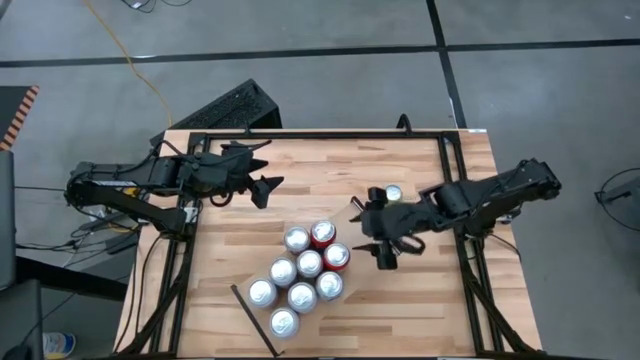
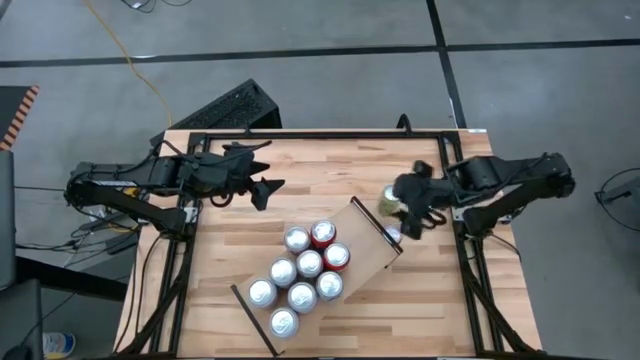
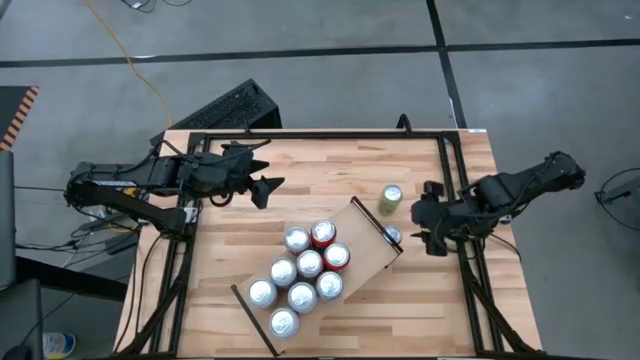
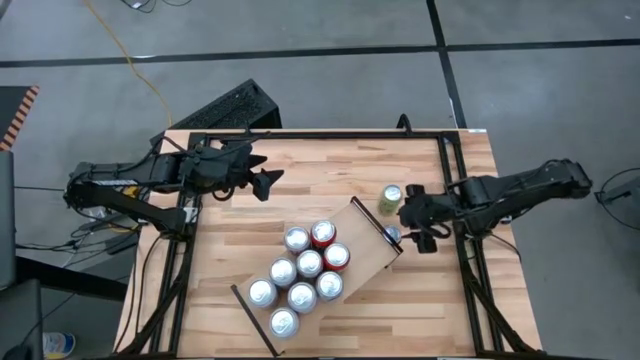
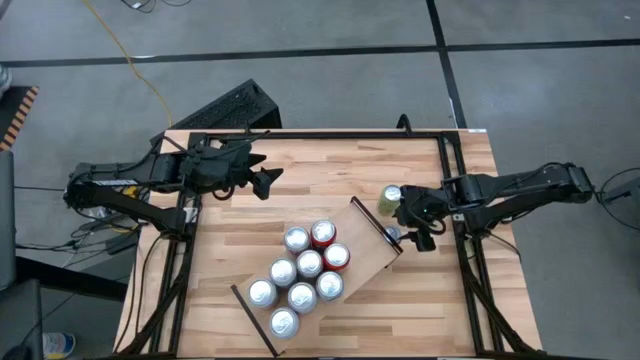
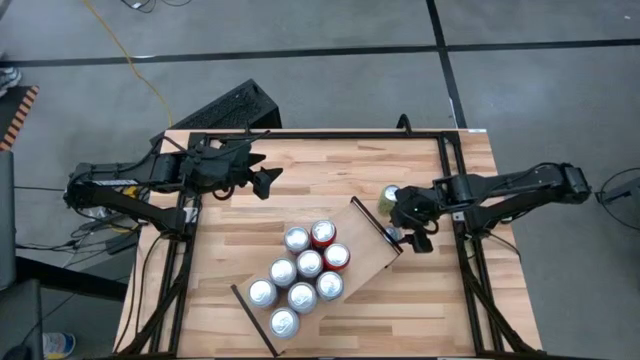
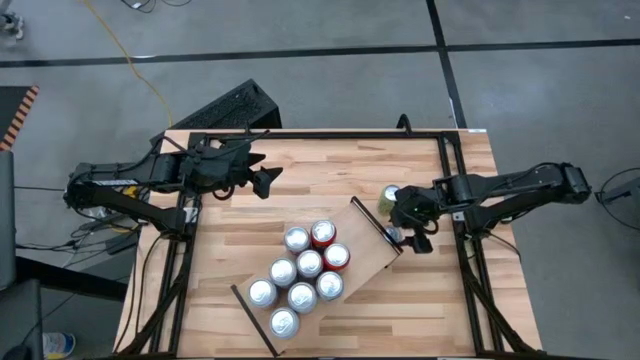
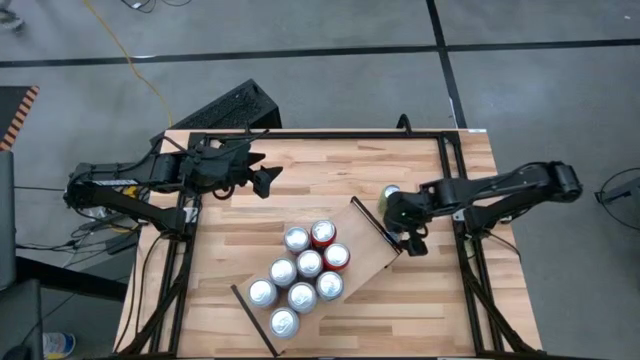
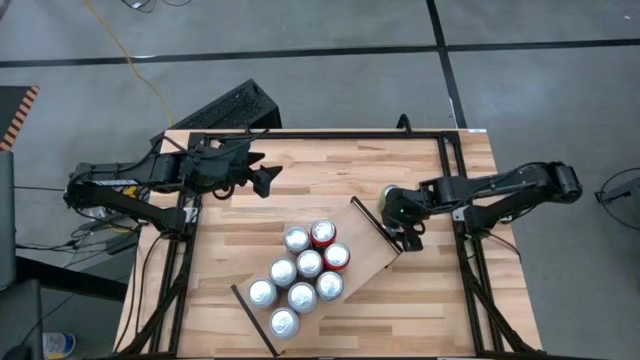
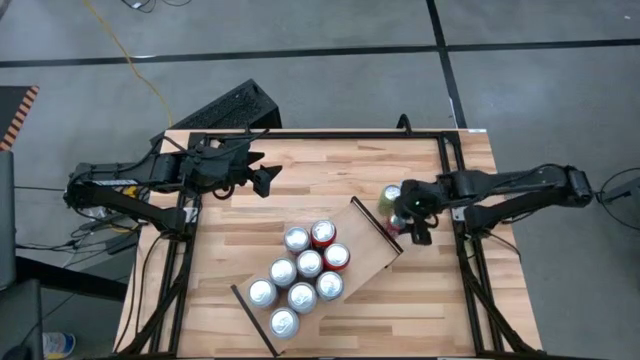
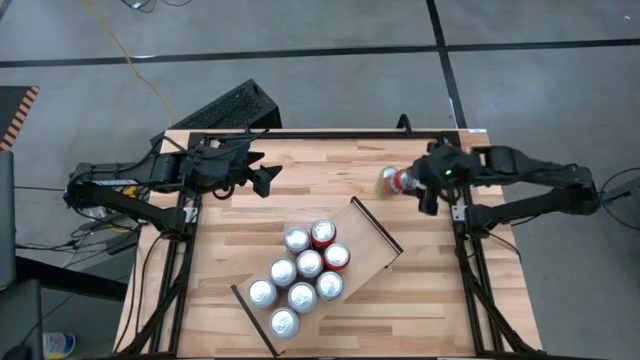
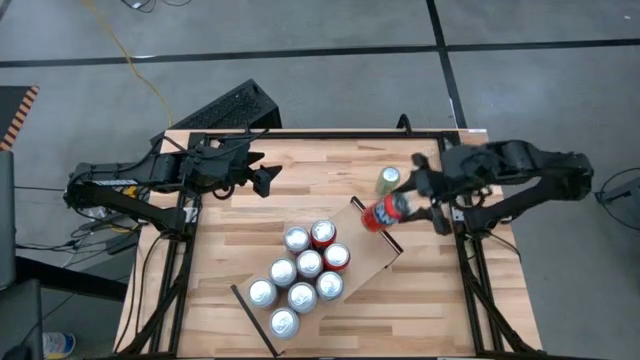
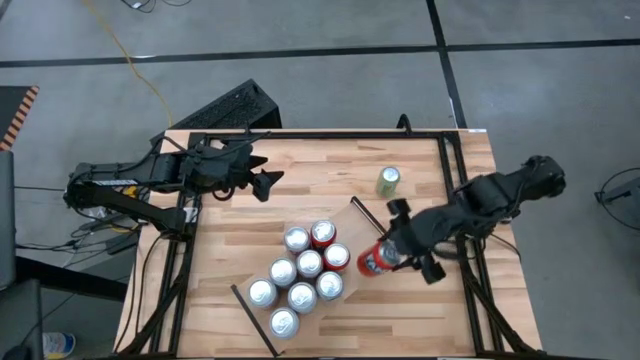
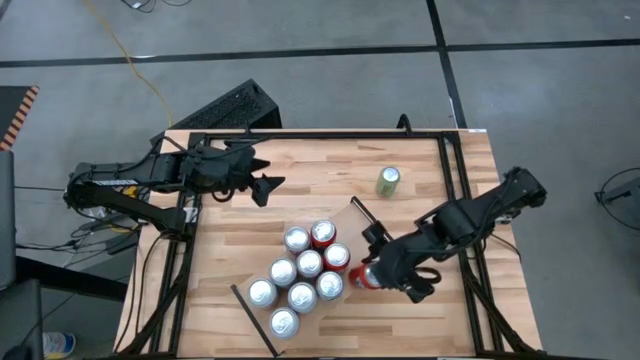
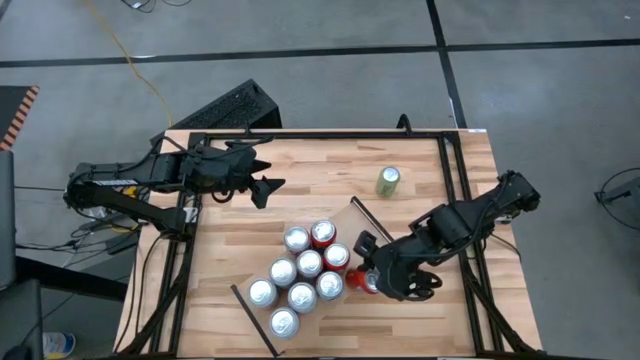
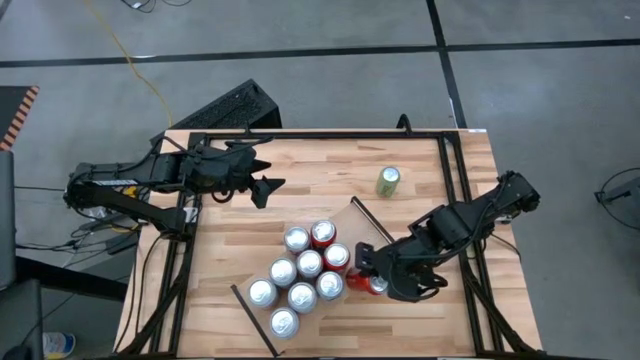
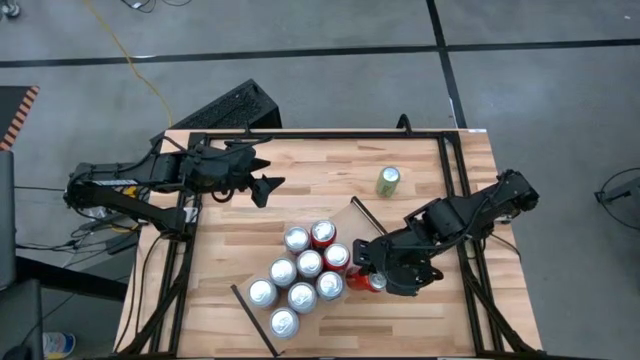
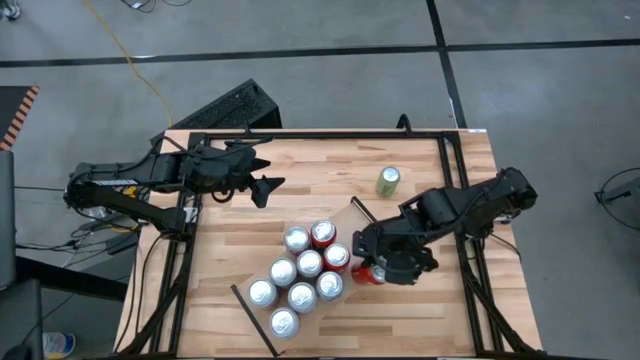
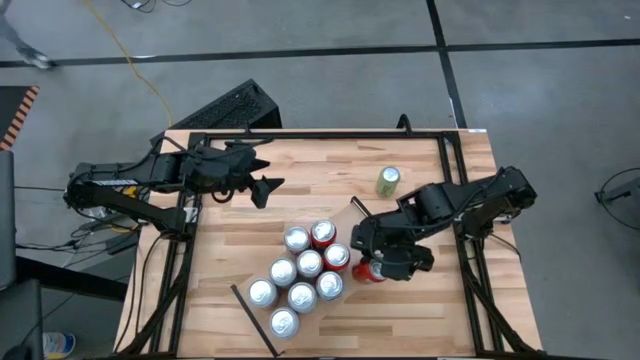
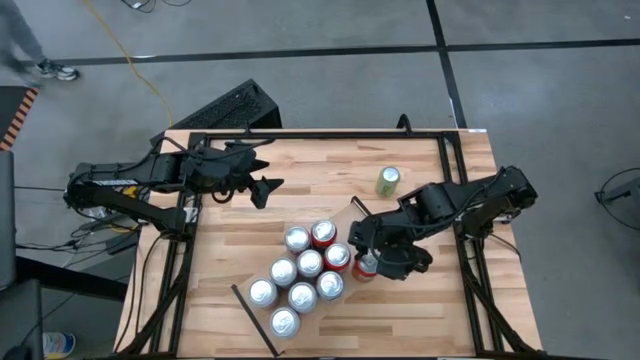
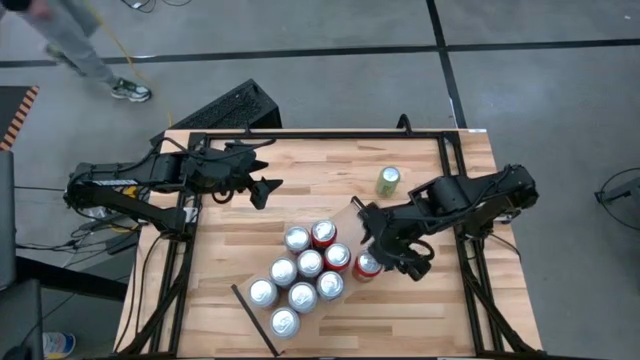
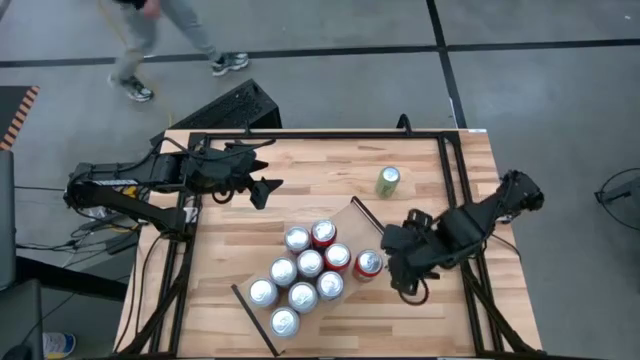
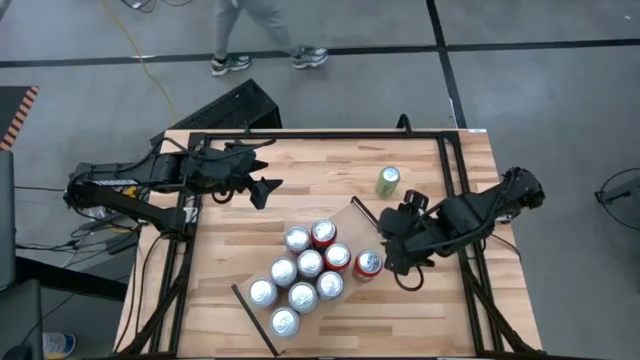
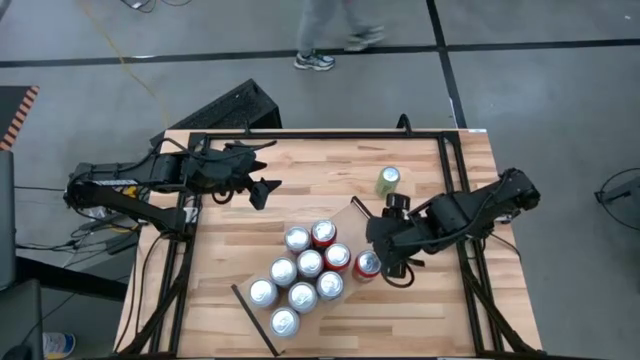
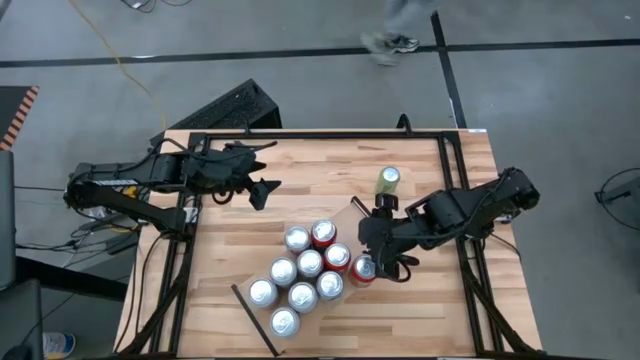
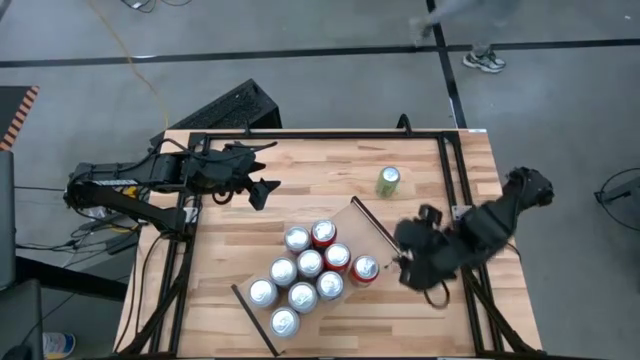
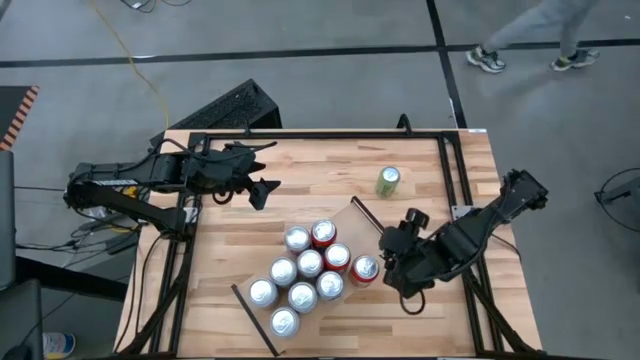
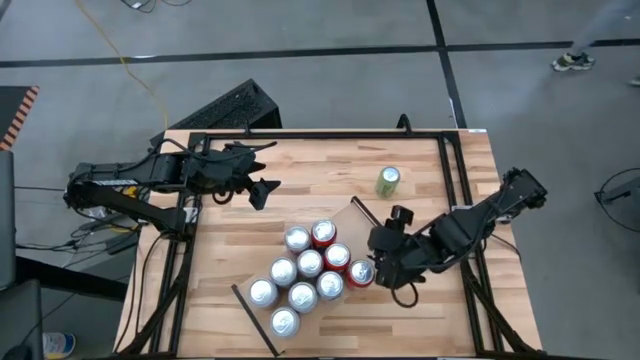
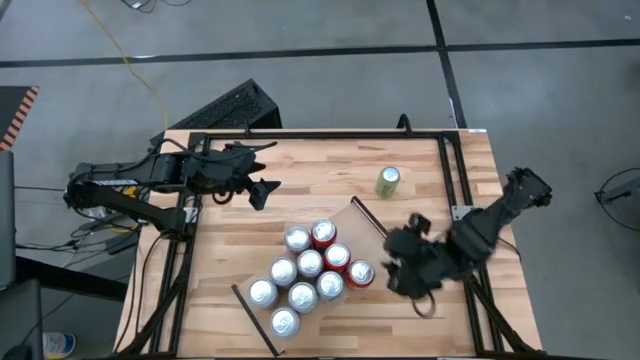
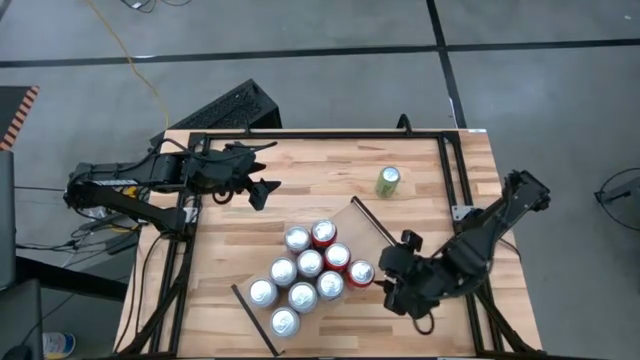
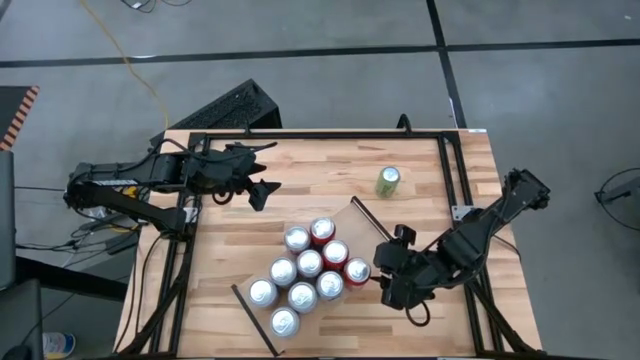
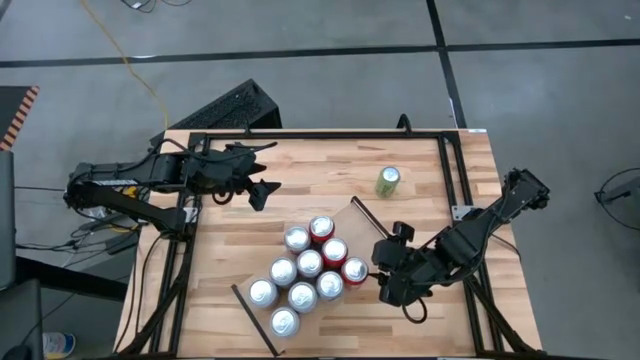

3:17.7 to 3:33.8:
Task: Place canned beverage on shelf
Put the red soda can on the shelf aligned with the other red soda cans

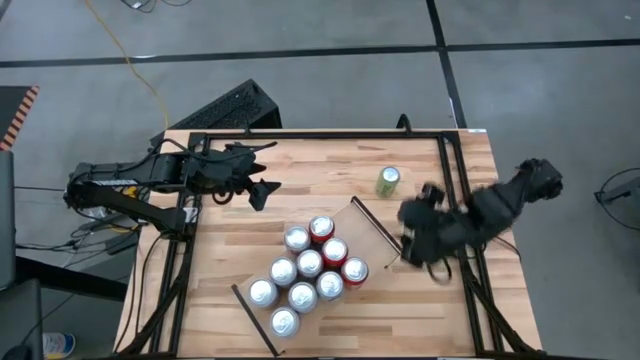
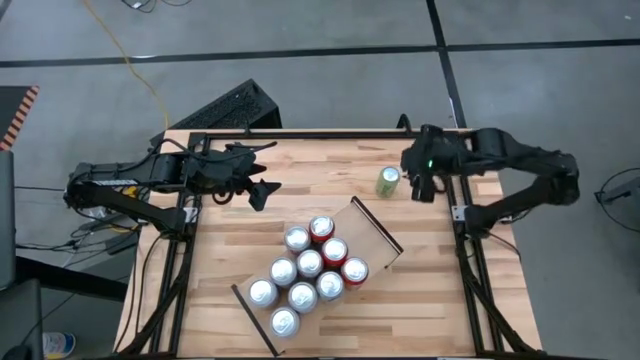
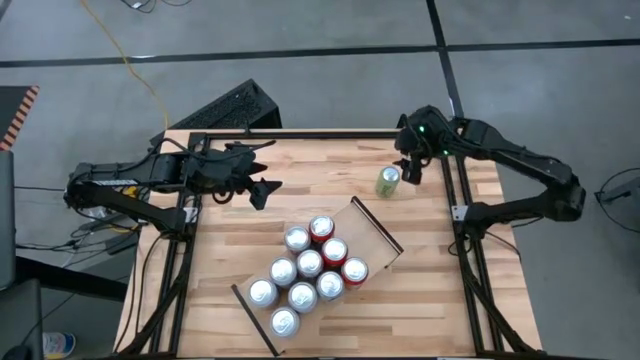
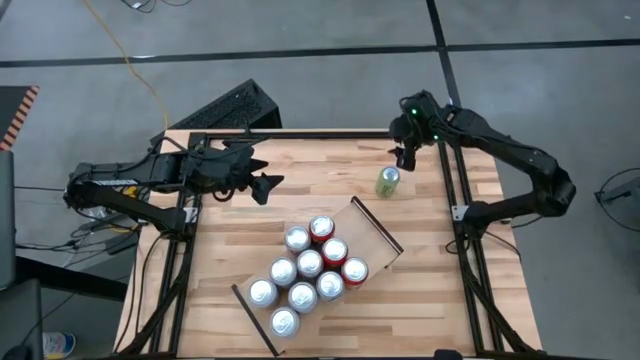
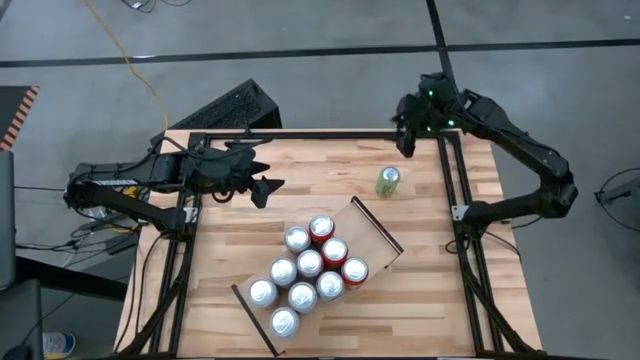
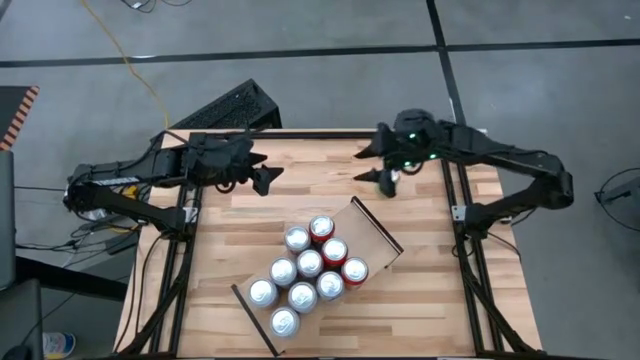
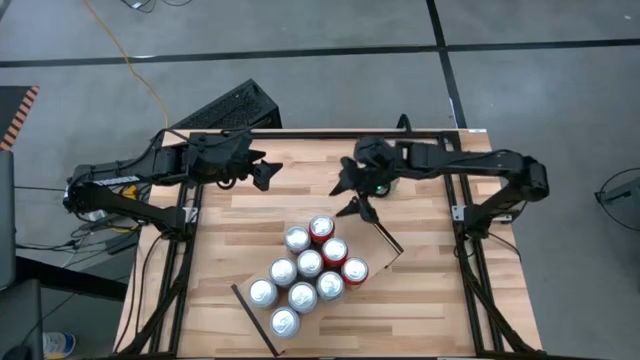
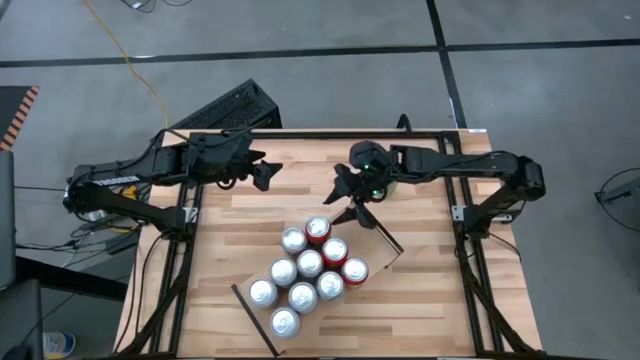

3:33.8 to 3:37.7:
Adjust the red soda can on the shelf
